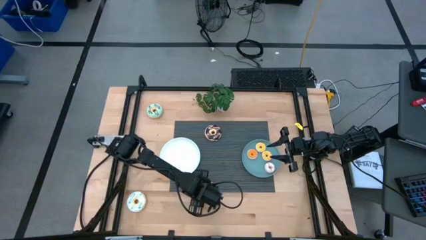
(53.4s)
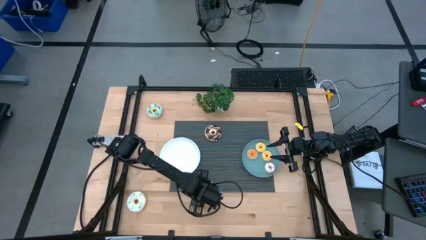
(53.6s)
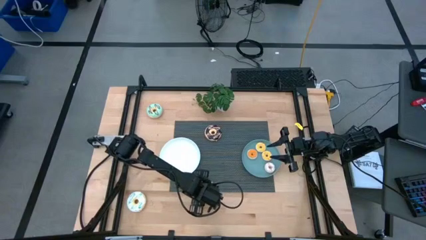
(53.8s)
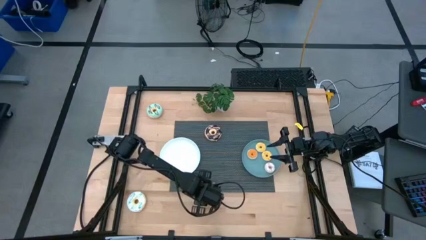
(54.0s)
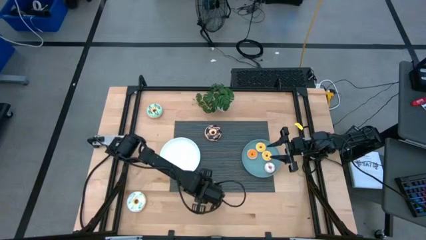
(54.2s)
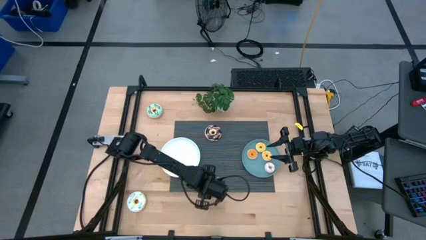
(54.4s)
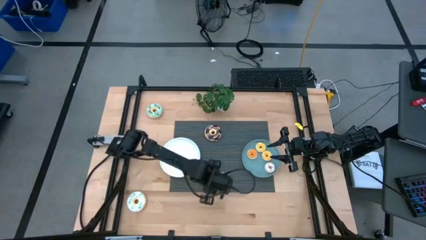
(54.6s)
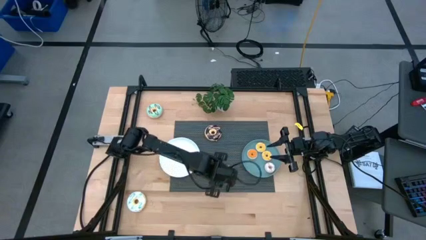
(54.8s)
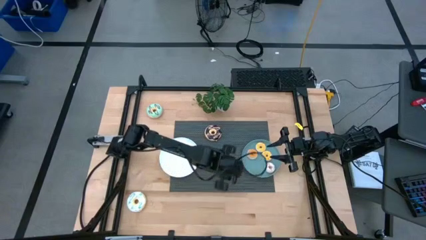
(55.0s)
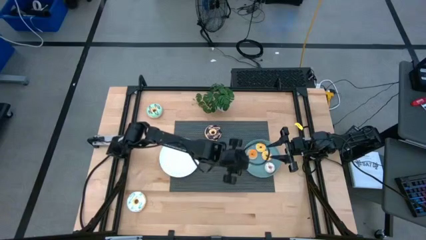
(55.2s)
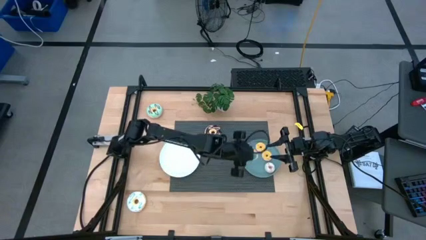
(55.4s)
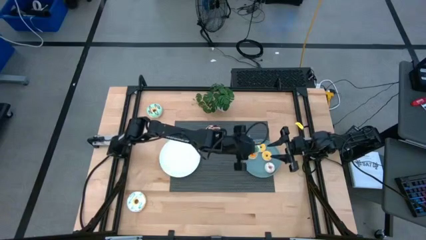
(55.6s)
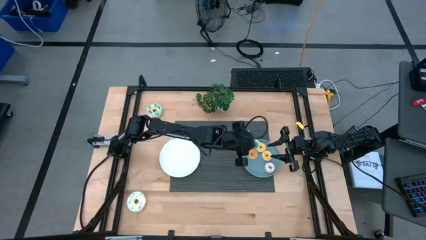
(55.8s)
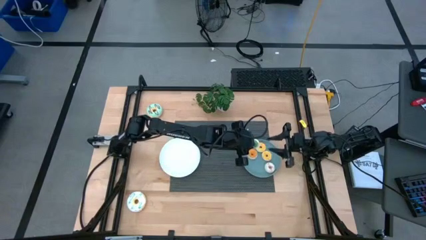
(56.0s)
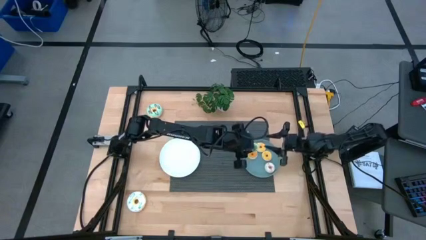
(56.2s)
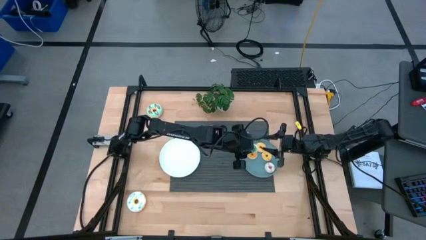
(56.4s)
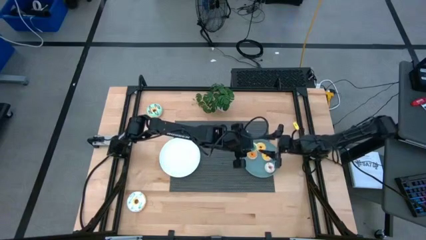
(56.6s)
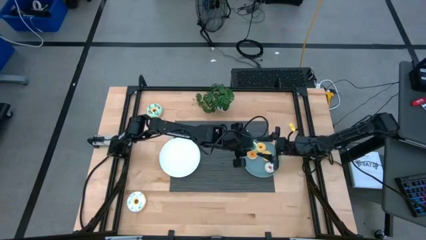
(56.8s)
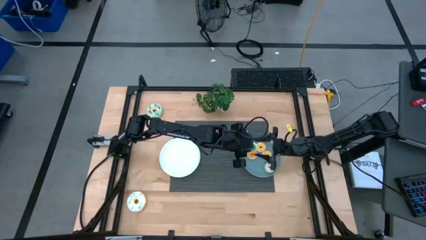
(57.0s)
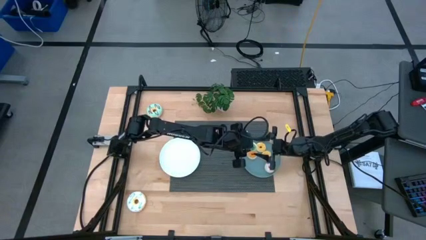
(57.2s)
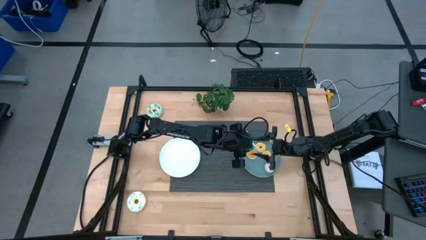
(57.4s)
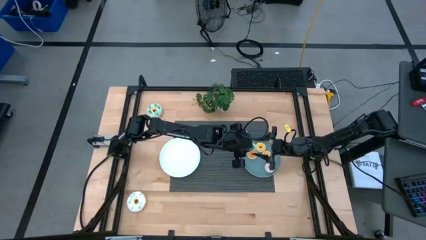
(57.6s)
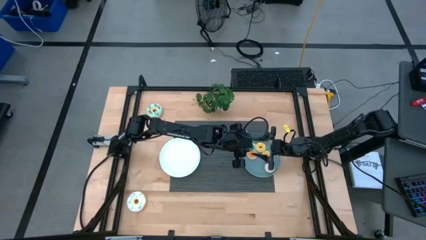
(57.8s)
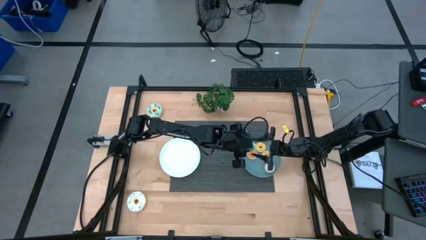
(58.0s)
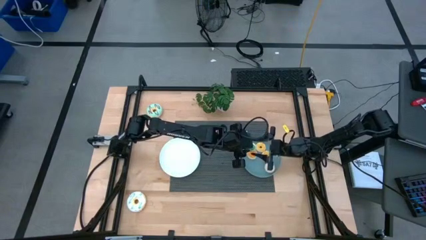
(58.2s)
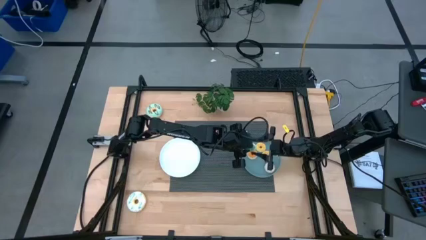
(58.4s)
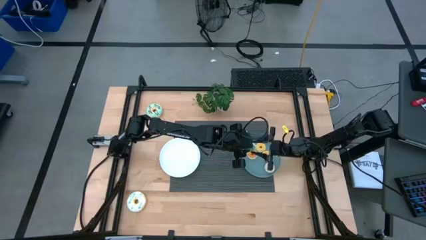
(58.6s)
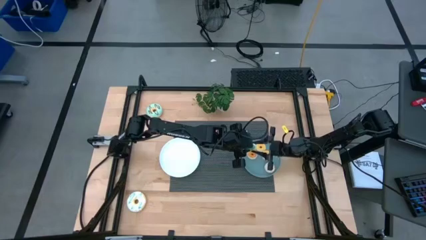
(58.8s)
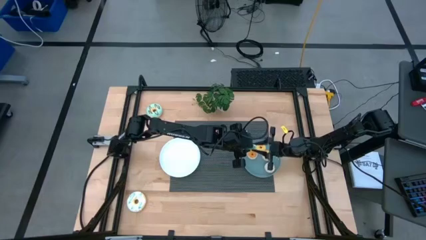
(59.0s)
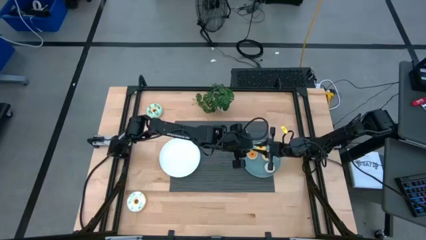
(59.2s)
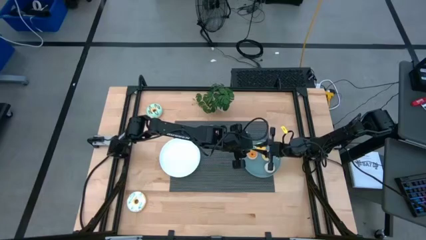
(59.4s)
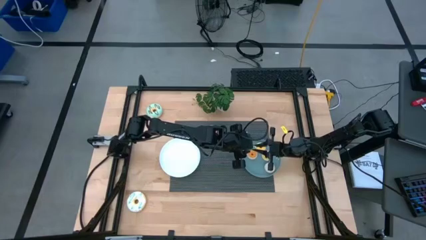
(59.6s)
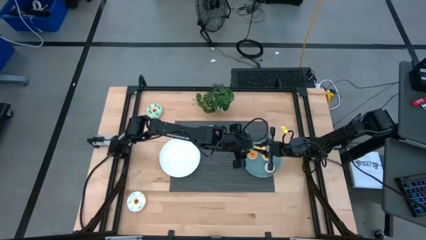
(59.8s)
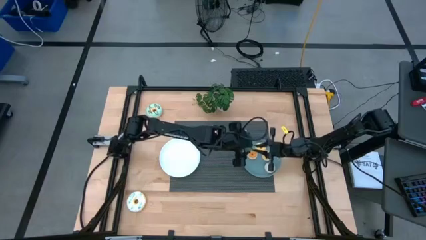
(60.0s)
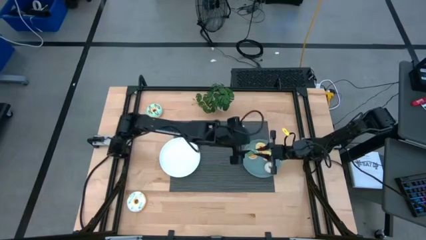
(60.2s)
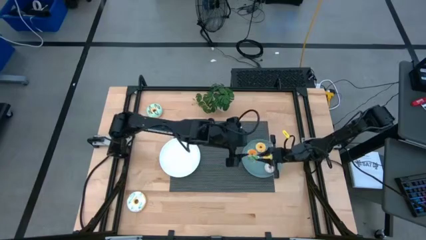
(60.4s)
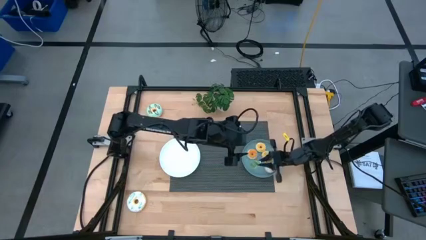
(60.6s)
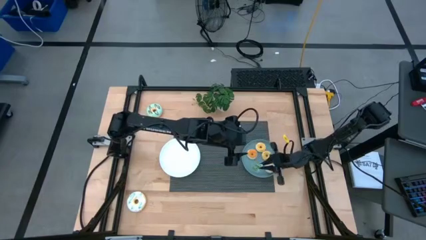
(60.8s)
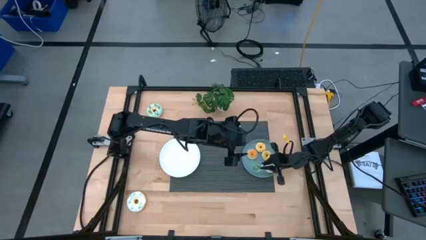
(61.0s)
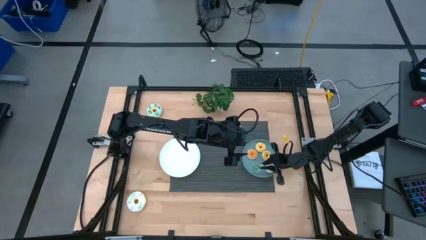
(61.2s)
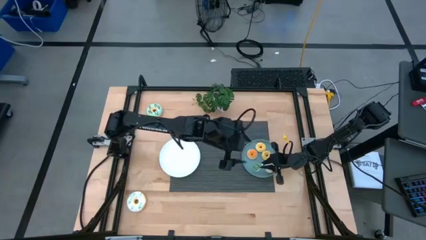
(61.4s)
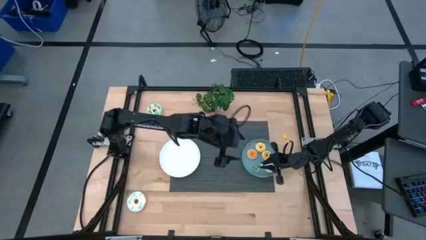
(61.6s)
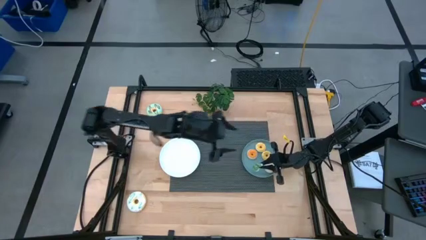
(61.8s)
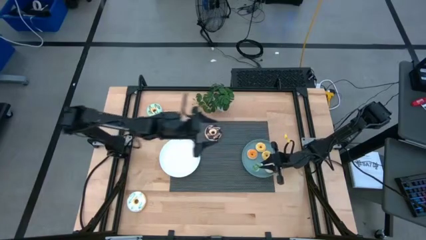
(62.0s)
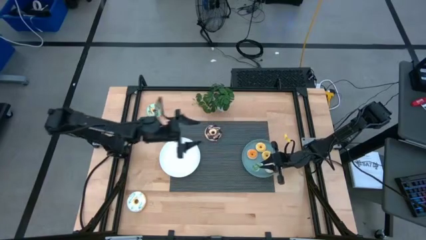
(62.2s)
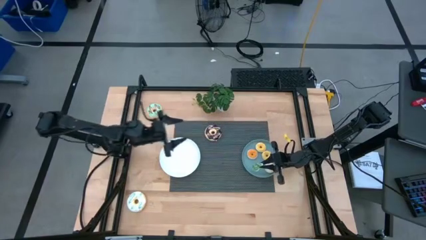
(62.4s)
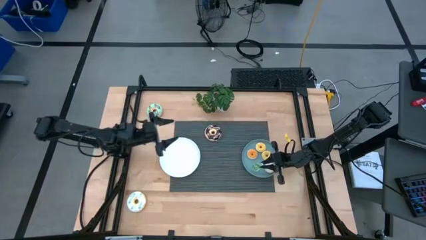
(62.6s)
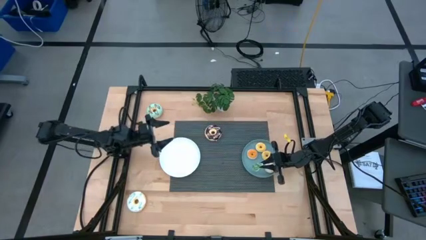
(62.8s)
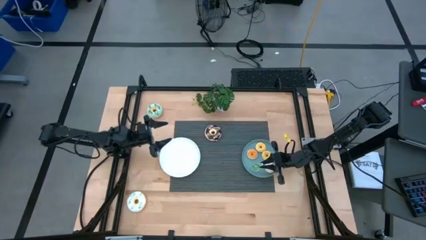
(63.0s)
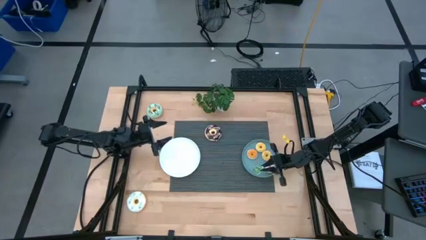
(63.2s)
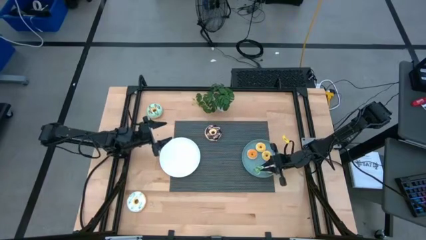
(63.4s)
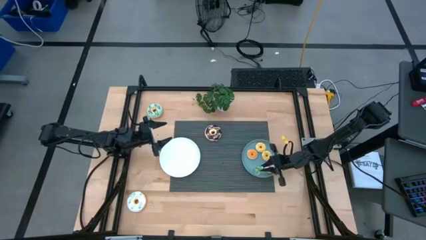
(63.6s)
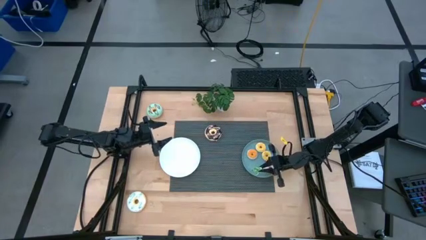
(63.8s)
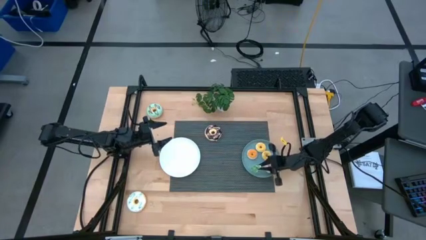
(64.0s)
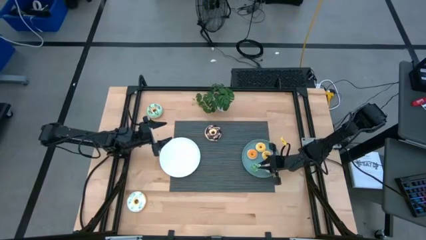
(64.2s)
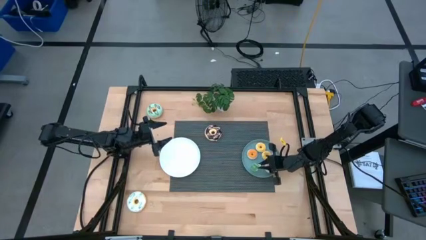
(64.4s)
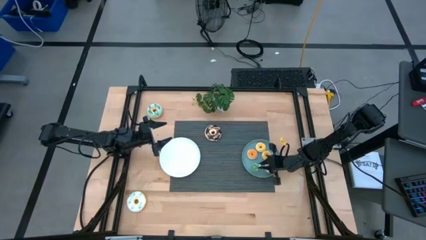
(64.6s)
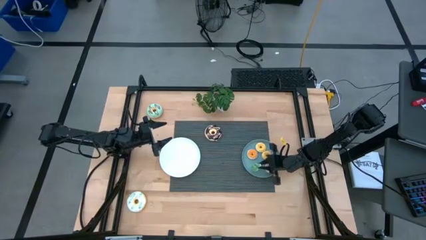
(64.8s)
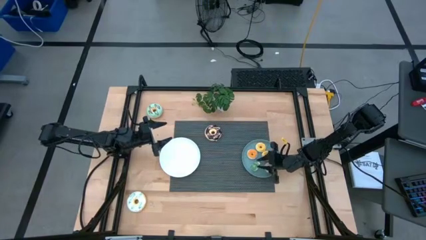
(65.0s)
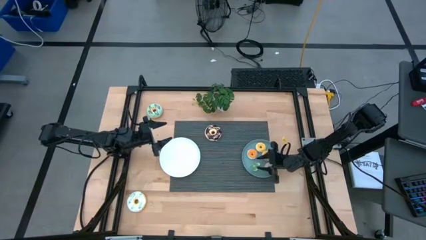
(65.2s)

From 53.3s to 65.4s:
Task: Pick & Place donuts
Put the small green doughnut on top of the blue plate
